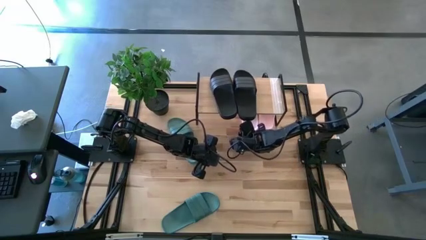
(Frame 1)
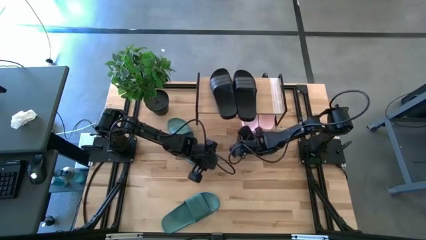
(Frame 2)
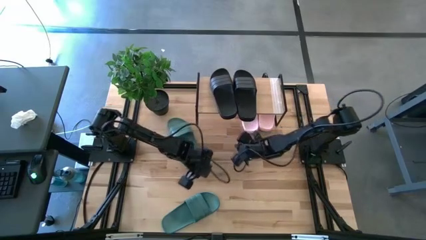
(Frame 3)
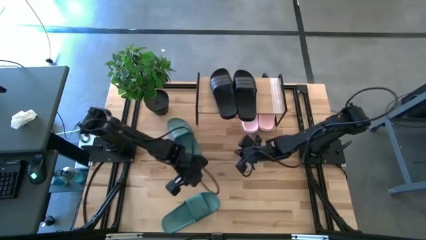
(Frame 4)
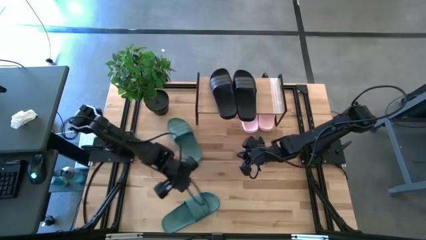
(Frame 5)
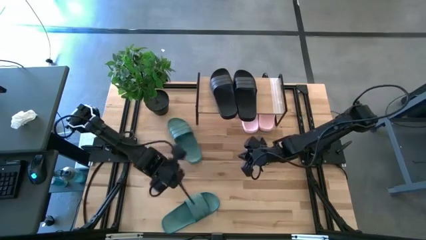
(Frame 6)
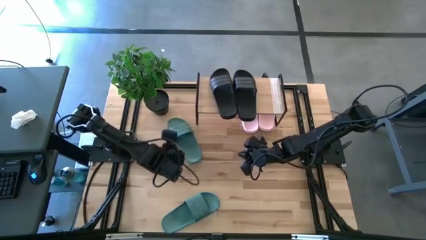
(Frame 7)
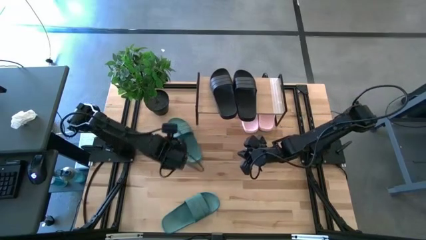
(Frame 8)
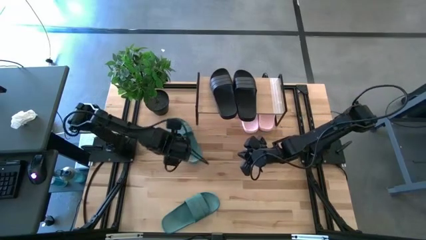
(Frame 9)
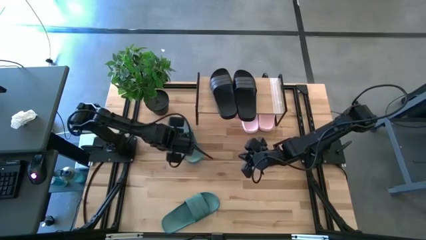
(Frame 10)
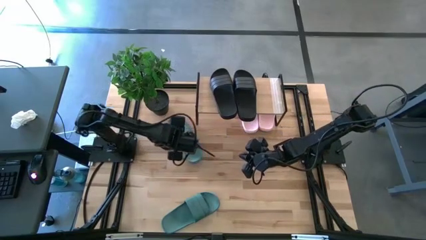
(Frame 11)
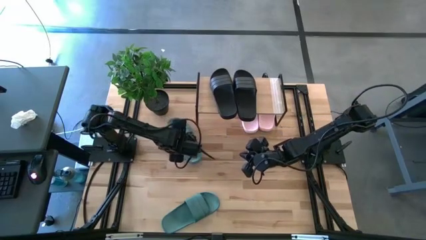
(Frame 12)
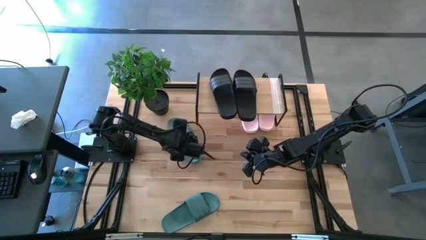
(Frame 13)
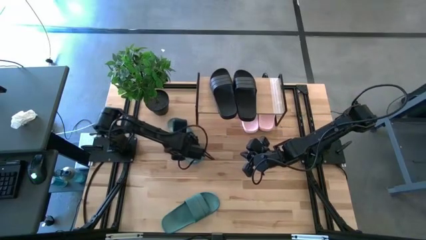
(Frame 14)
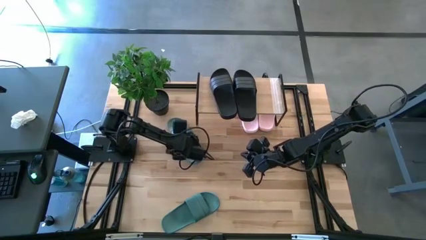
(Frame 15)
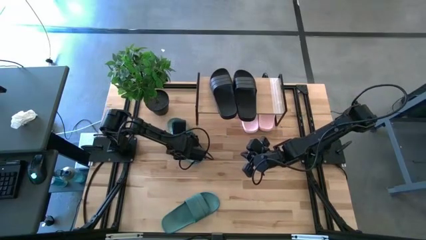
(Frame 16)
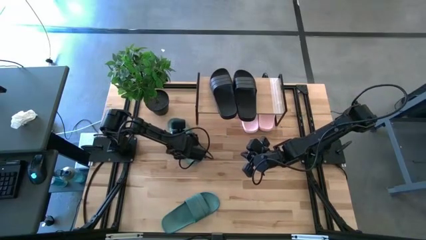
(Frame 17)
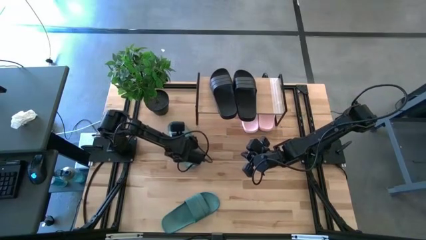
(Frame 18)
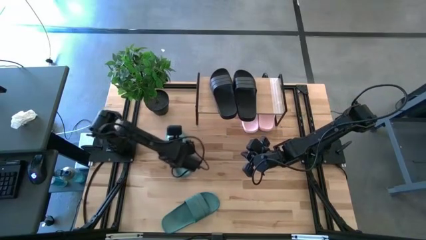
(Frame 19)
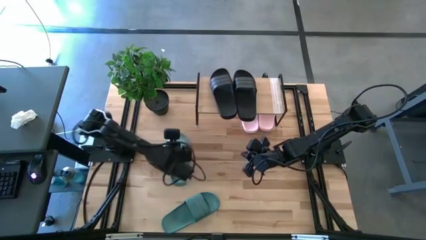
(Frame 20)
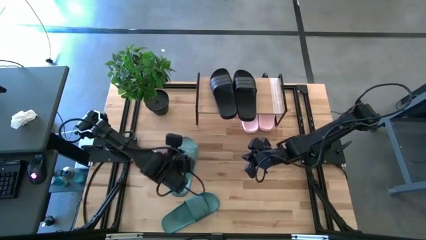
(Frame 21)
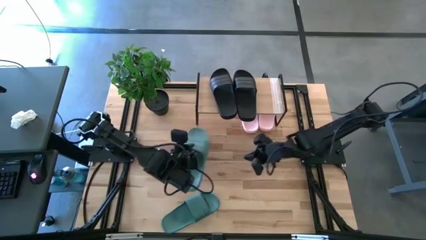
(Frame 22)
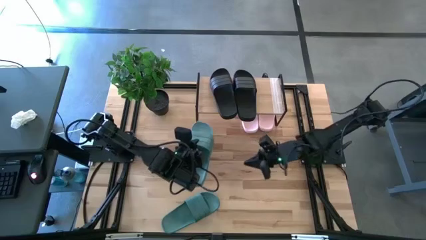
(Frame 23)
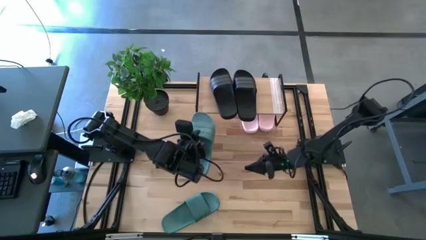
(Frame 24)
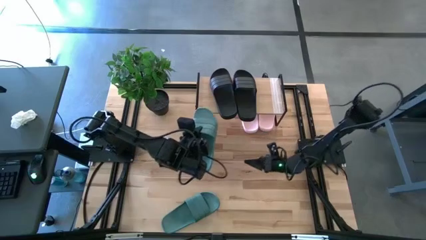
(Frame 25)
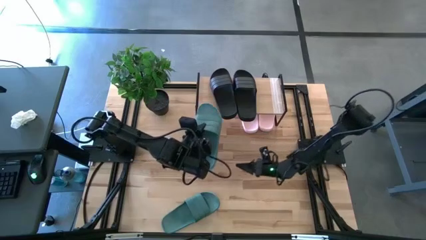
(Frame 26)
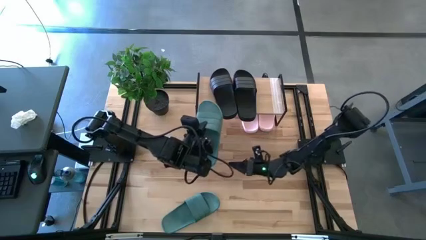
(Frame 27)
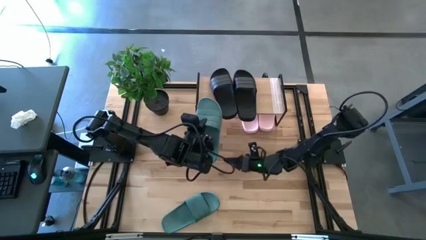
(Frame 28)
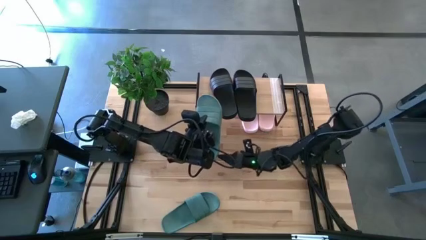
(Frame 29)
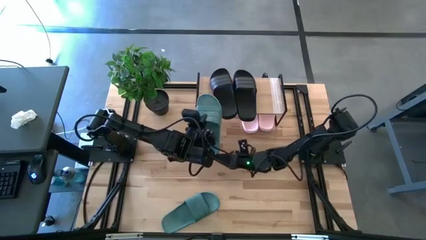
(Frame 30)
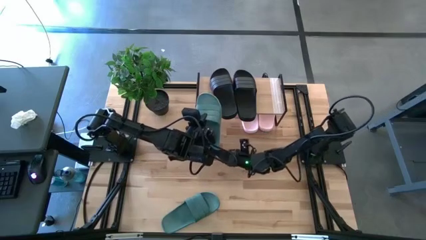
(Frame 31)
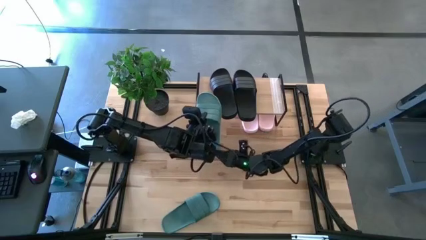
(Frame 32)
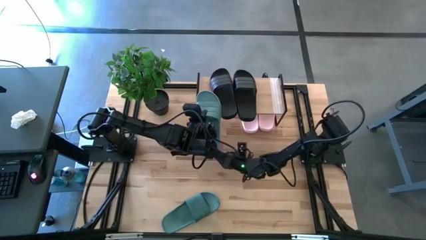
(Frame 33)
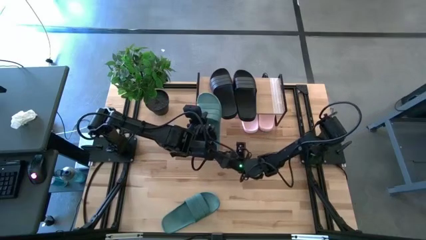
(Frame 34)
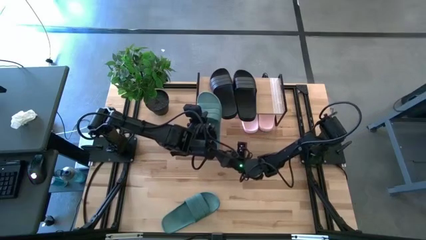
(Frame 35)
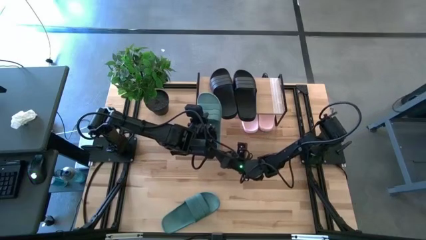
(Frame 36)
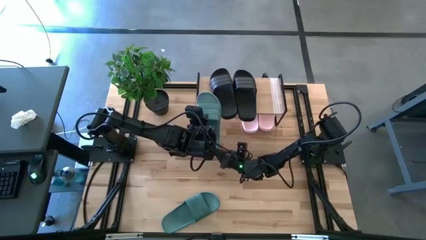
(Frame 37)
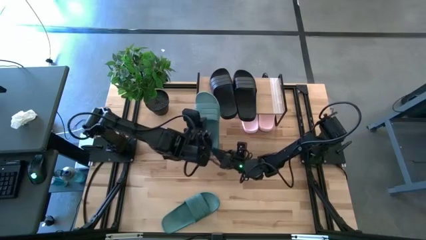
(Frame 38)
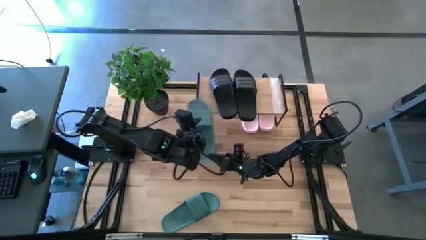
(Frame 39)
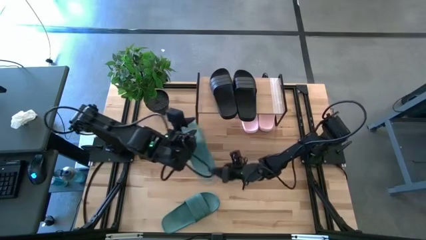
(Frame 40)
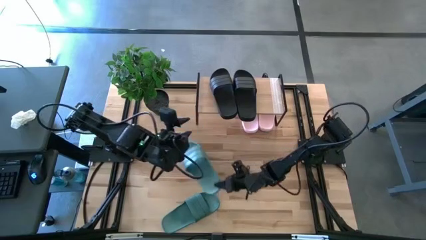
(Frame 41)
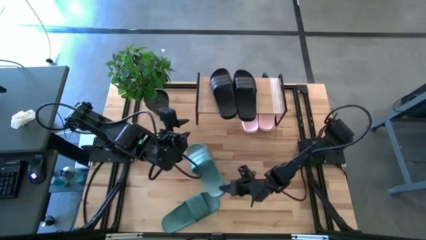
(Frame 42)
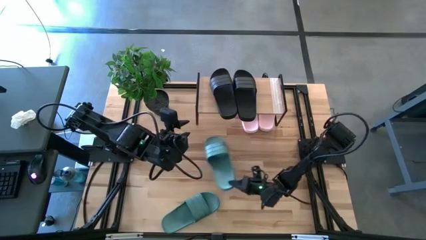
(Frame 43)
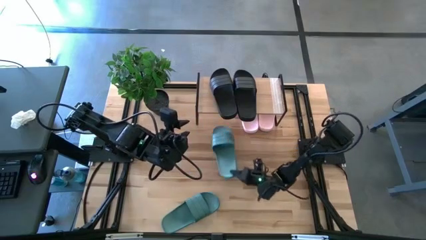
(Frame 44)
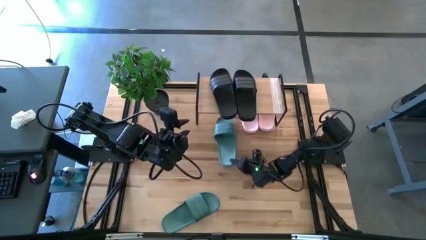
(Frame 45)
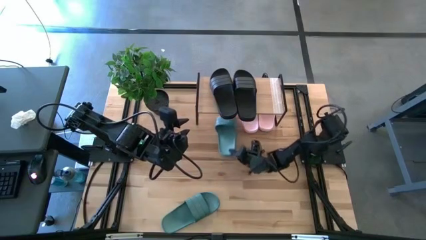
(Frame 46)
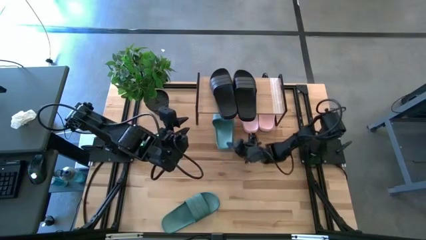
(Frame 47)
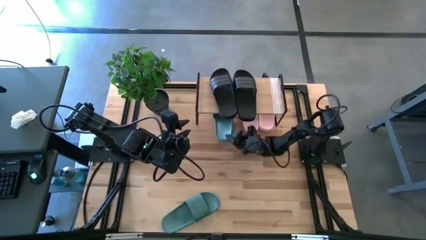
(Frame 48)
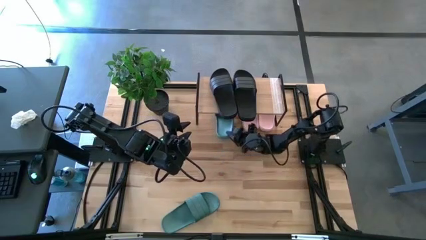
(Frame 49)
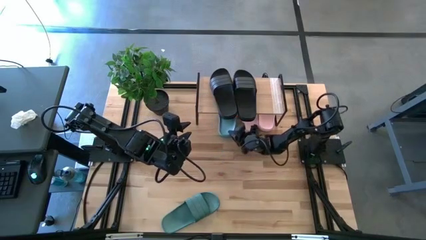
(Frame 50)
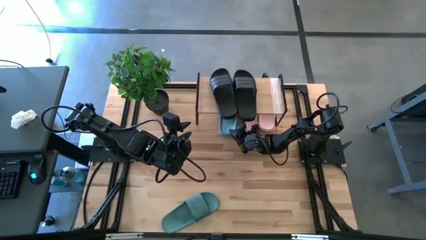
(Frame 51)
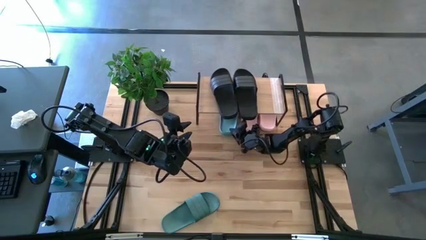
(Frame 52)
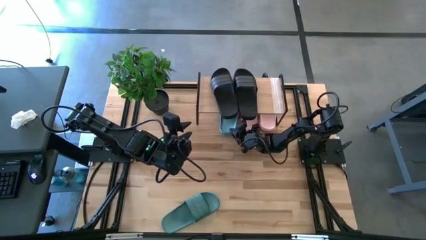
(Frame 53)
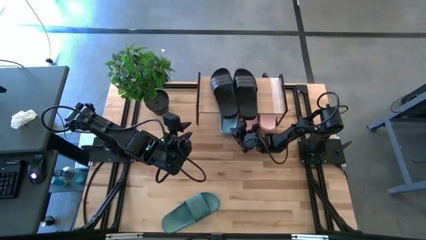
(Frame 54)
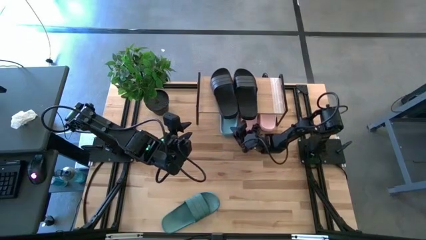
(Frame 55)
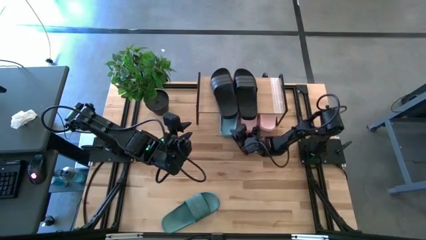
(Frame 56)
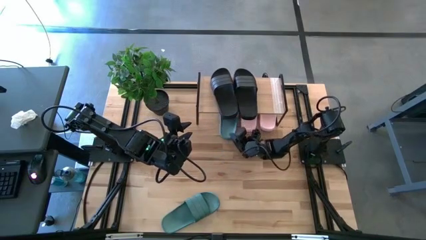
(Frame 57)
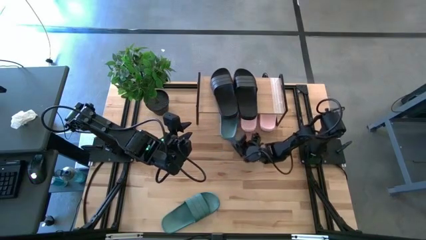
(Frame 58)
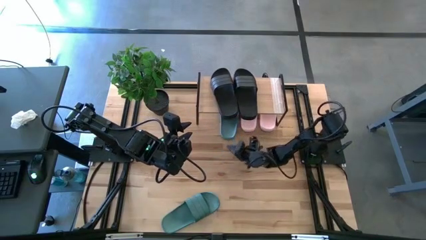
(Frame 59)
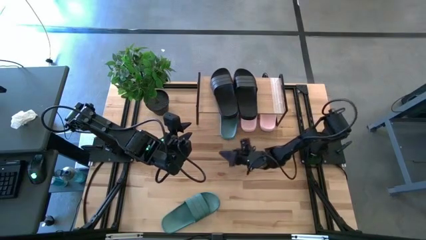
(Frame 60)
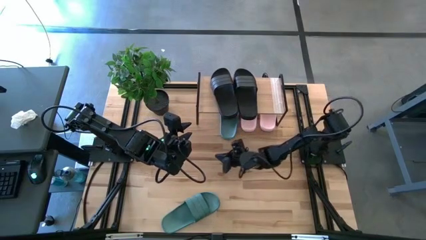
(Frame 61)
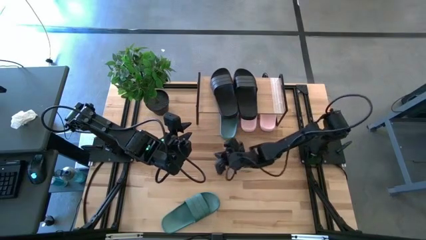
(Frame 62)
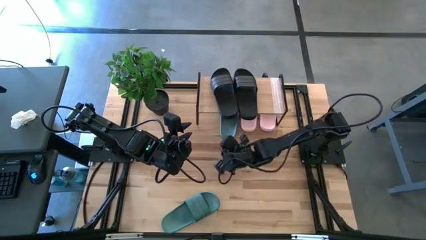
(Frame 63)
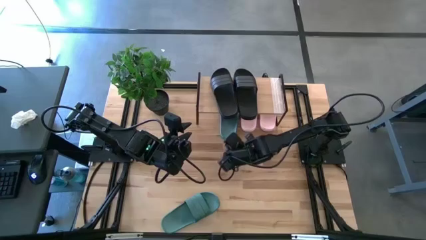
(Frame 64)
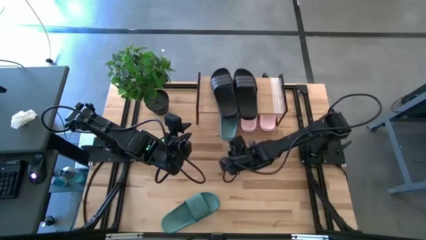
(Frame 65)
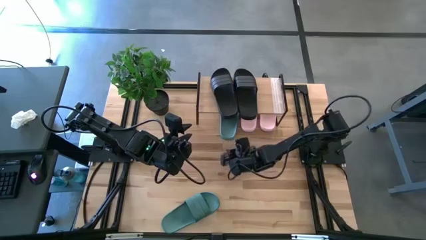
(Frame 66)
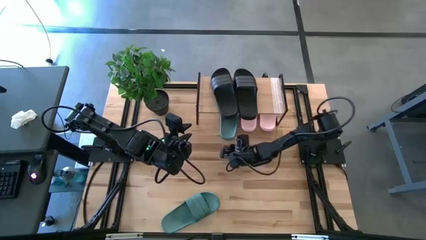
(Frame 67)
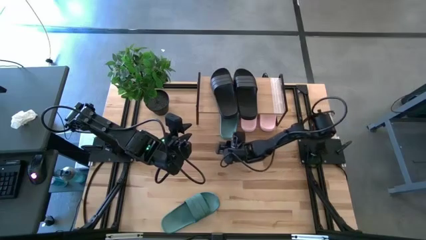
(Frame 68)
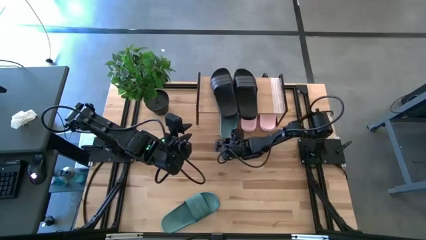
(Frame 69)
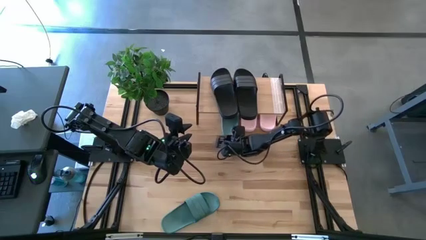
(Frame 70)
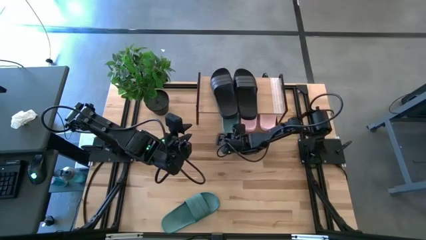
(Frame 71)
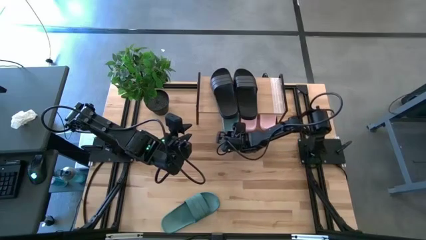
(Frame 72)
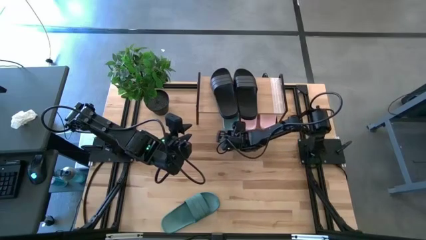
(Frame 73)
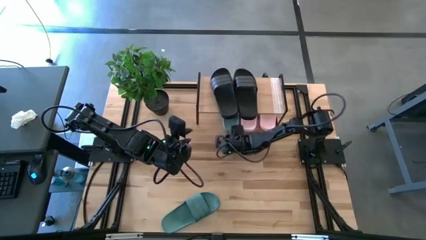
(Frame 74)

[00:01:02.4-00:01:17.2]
Task: Pick and place slides into the shelf
Put the top green slipper under the shelf

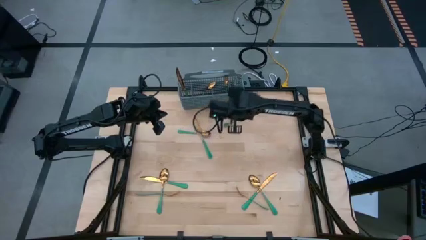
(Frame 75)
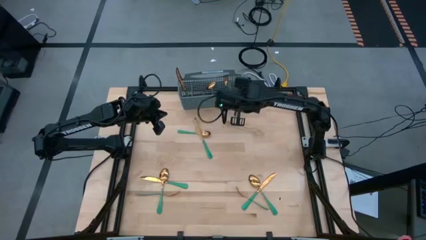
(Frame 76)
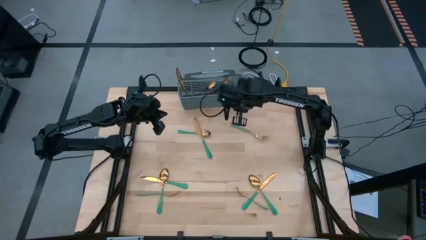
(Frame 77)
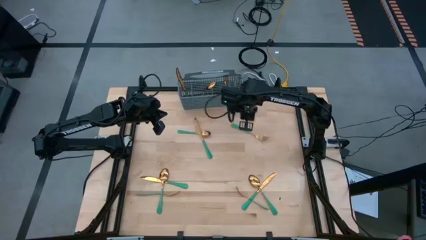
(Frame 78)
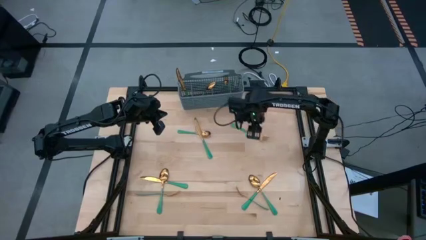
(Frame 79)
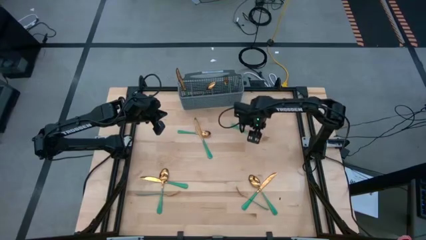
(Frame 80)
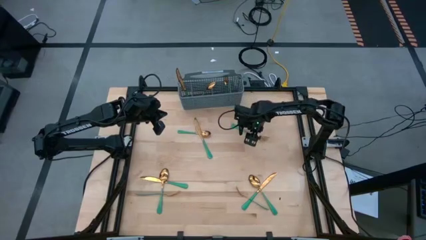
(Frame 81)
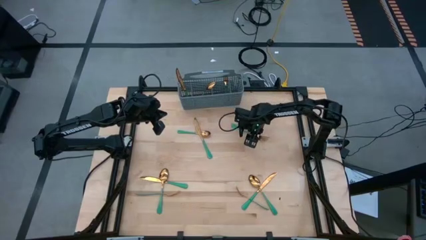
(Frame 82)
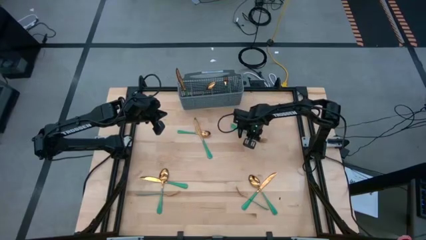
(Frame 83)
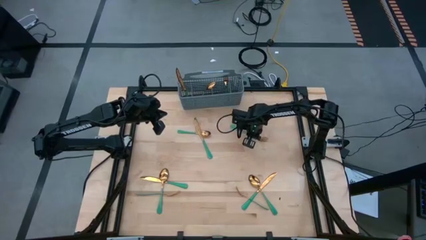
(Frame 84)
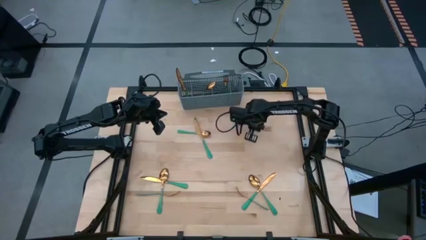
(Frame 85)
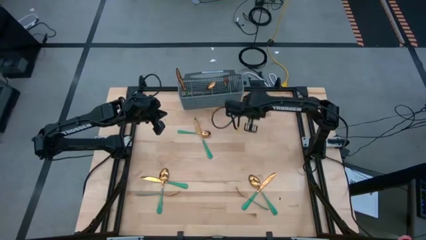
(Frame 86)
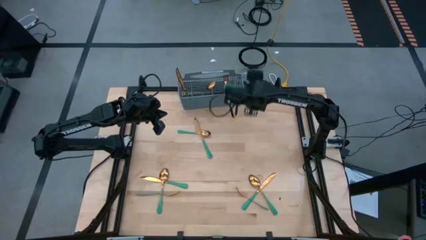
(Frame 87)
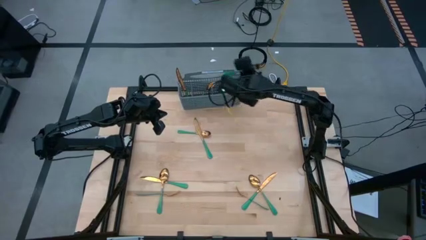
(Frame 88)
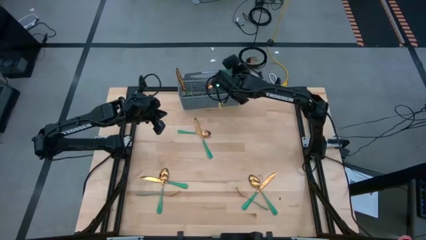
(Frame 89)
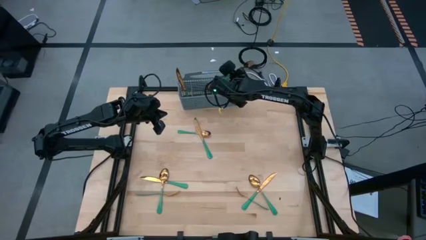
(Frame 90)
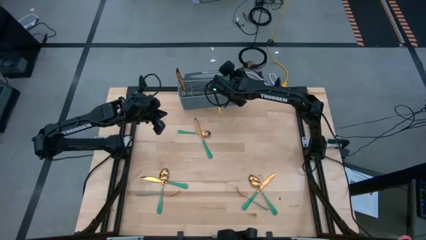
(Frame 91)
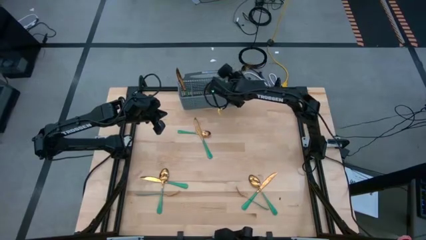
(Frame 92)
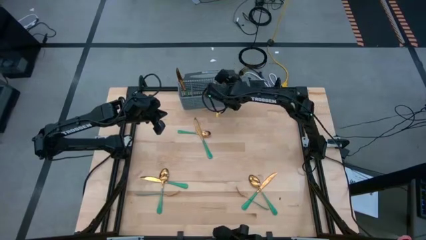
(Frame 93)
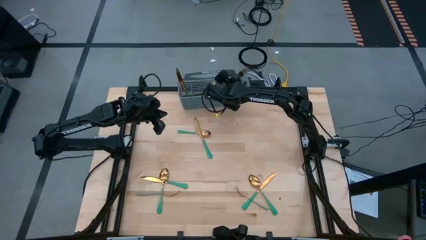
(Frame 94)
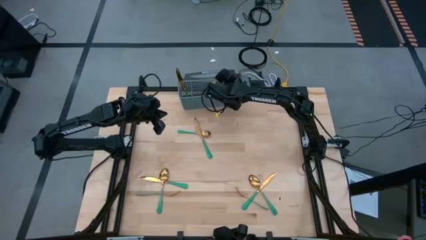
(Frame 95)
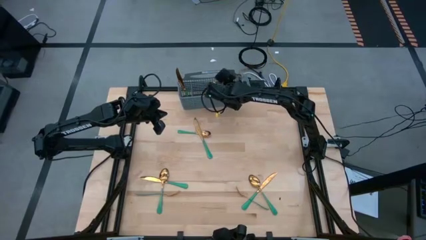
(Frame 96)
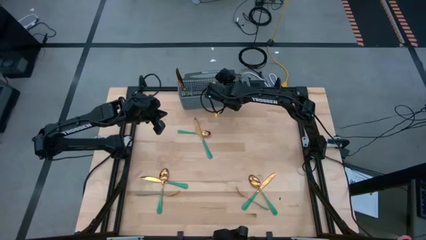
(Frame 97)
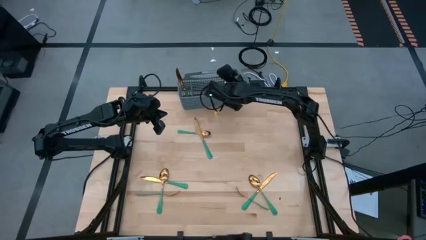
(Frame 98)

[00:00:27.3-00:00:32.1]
Task: Sort silverware
Put the green fork into the gray bin
